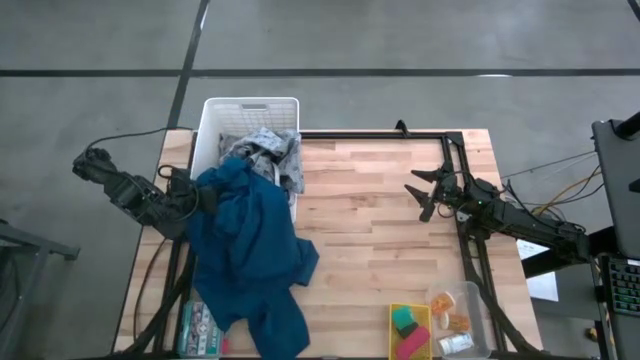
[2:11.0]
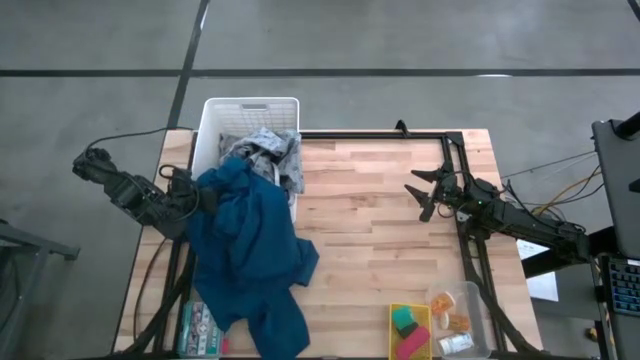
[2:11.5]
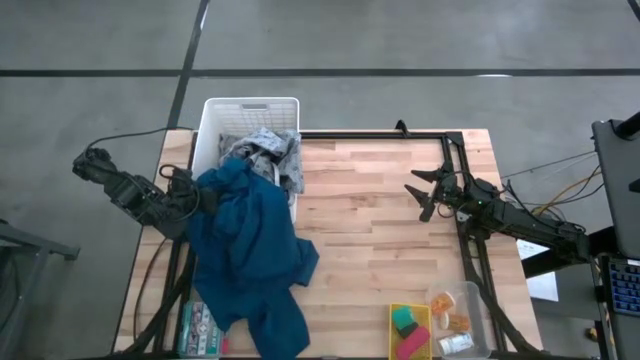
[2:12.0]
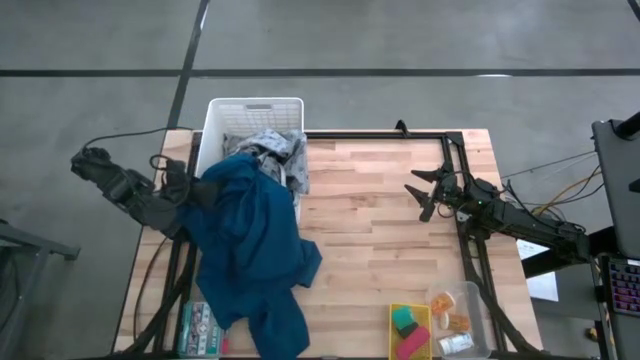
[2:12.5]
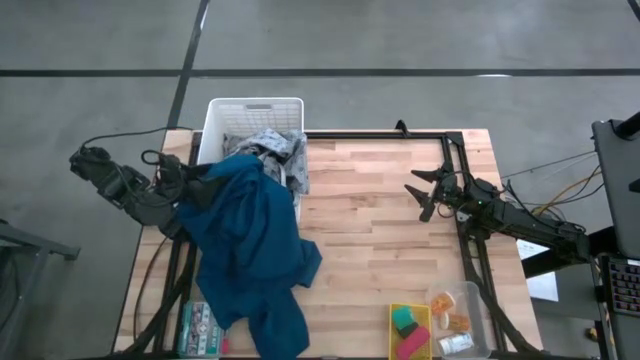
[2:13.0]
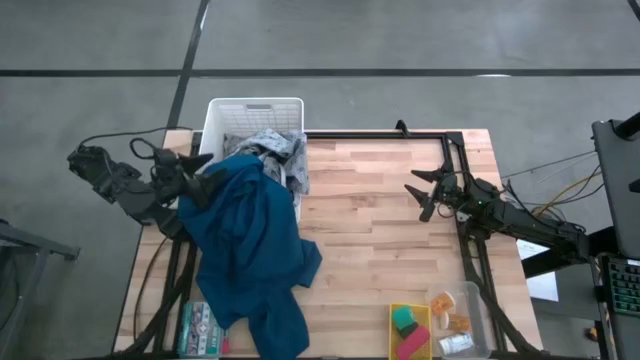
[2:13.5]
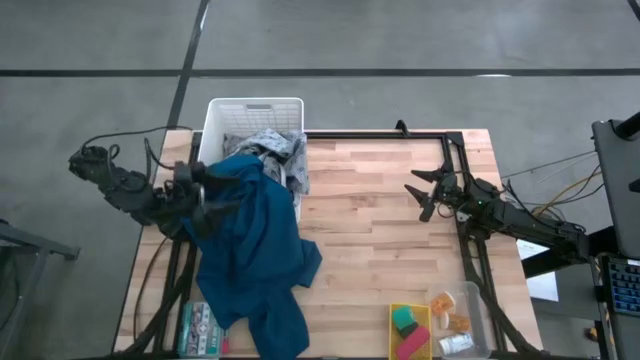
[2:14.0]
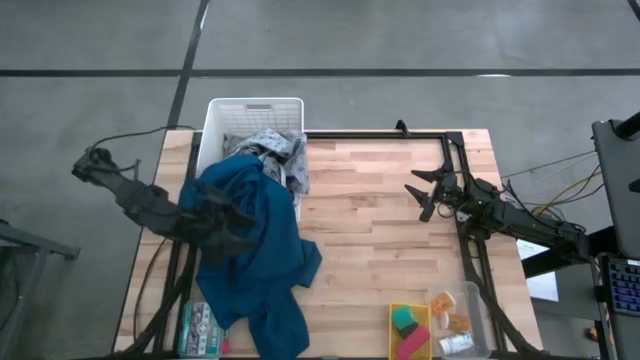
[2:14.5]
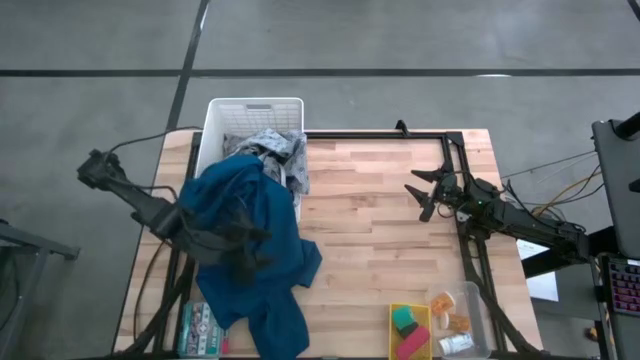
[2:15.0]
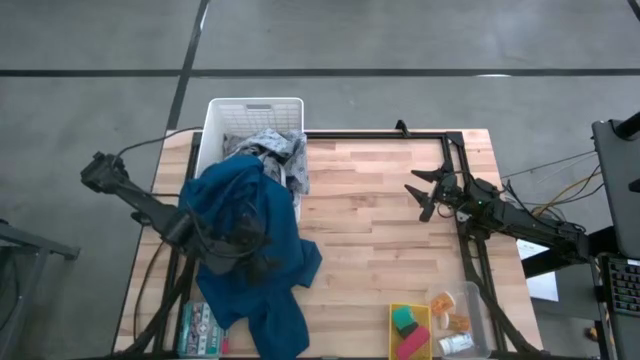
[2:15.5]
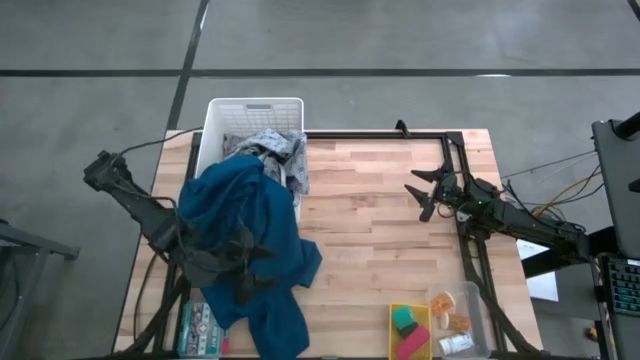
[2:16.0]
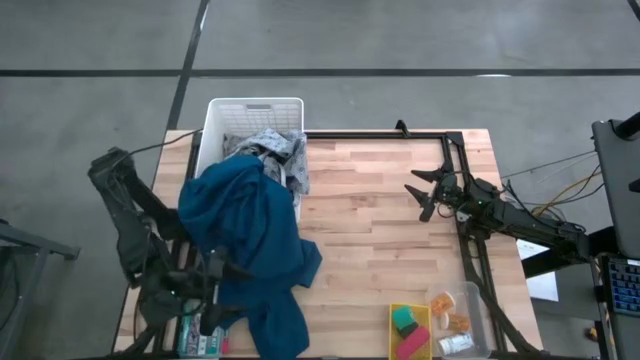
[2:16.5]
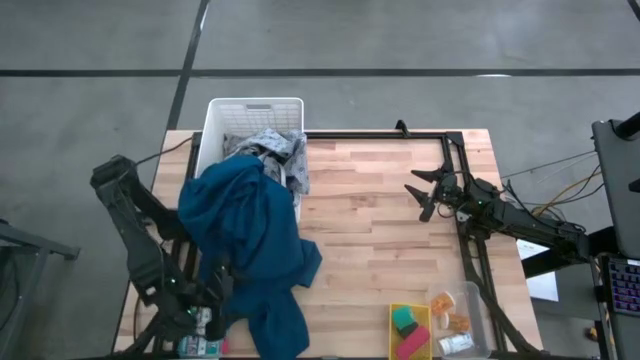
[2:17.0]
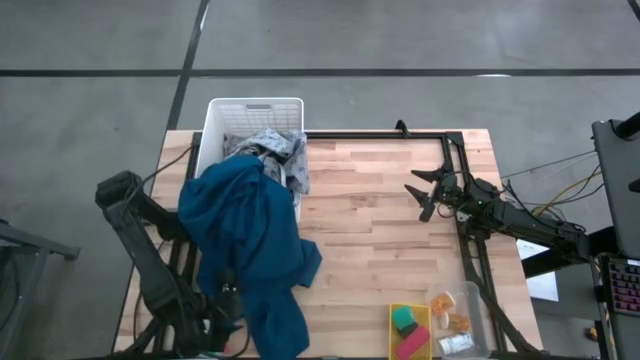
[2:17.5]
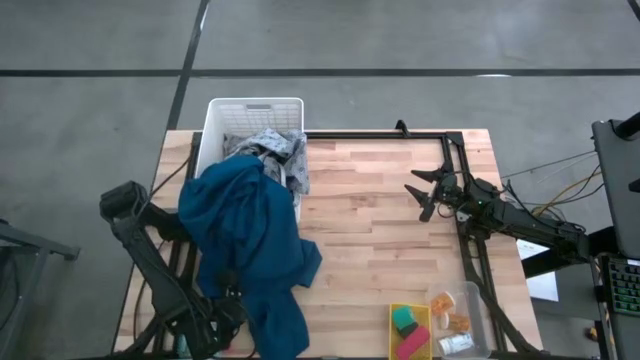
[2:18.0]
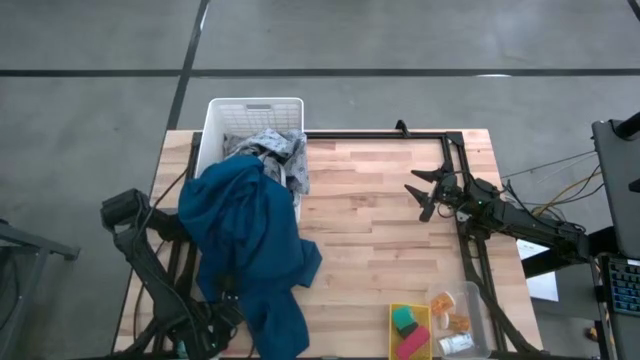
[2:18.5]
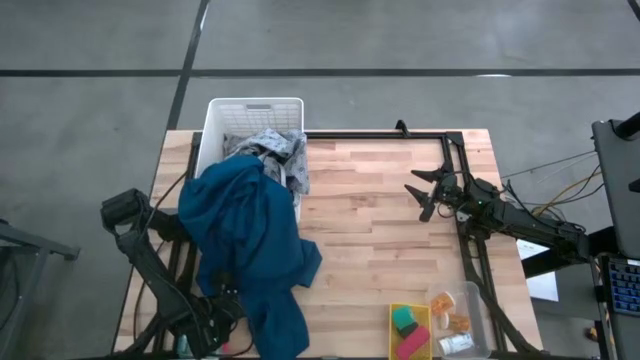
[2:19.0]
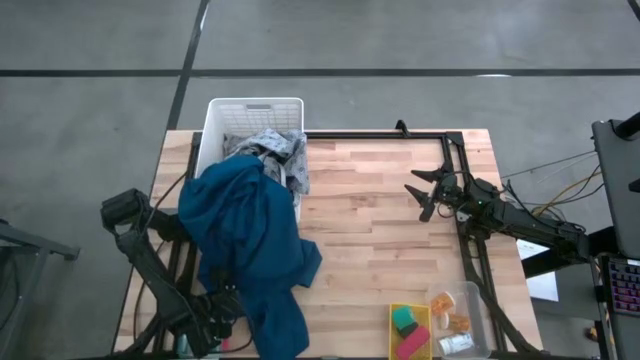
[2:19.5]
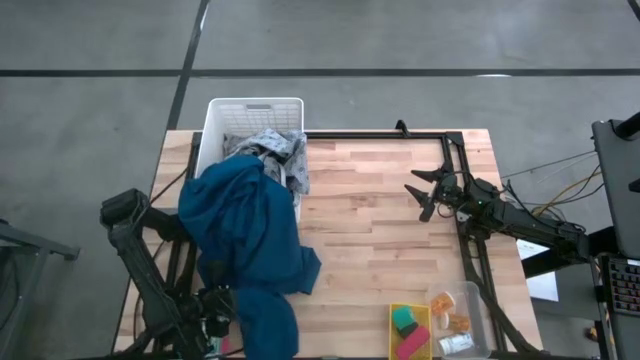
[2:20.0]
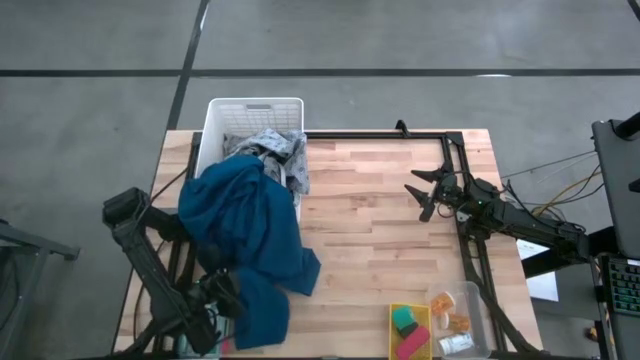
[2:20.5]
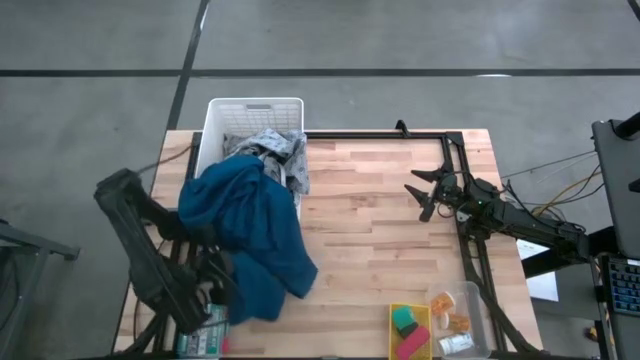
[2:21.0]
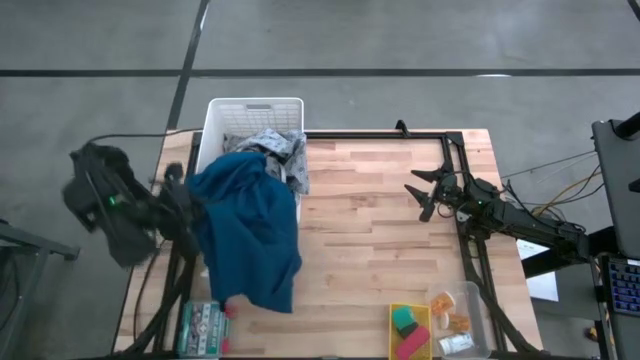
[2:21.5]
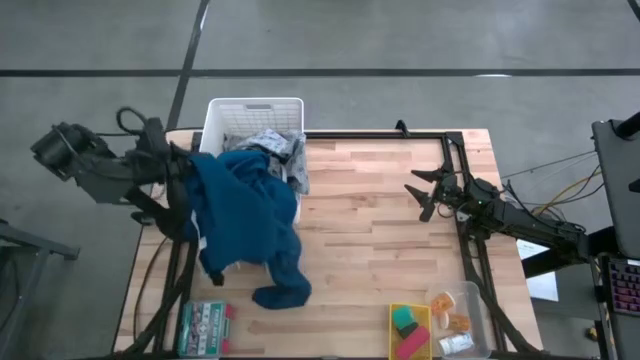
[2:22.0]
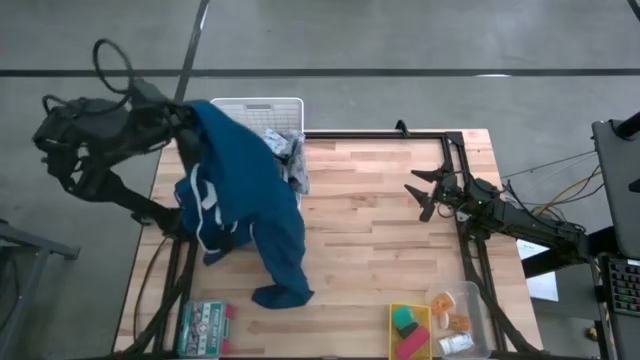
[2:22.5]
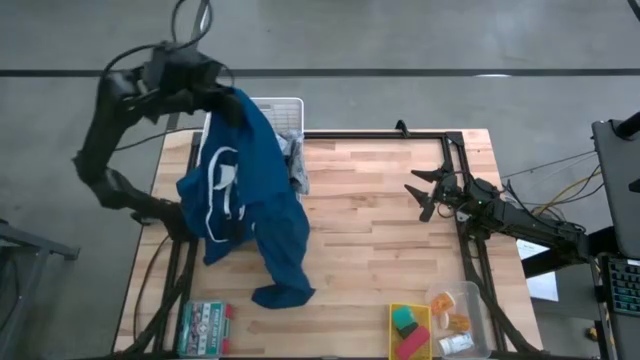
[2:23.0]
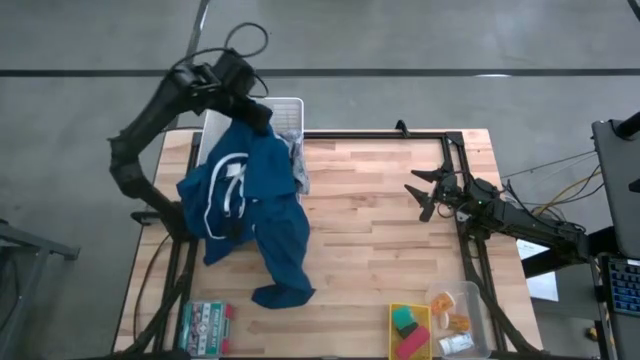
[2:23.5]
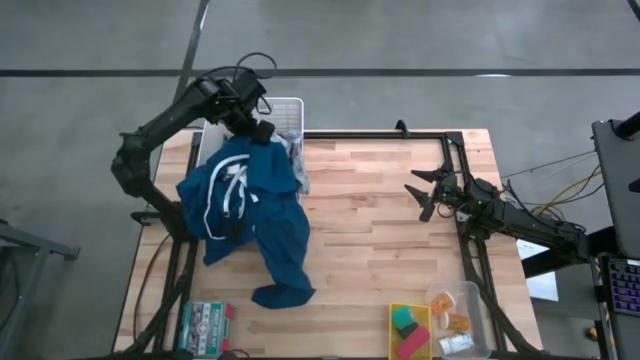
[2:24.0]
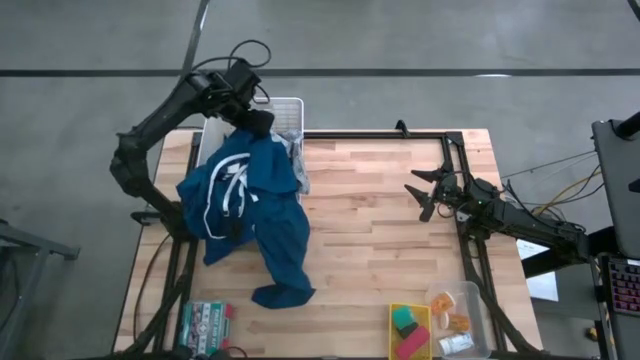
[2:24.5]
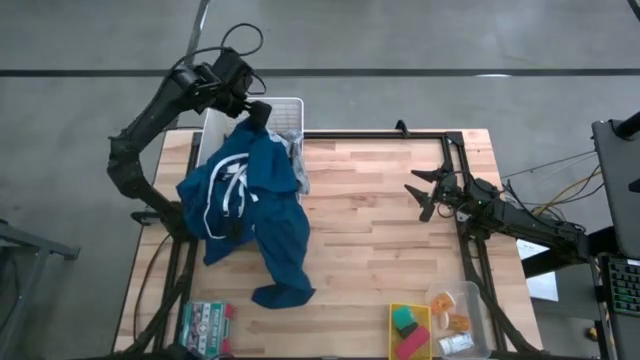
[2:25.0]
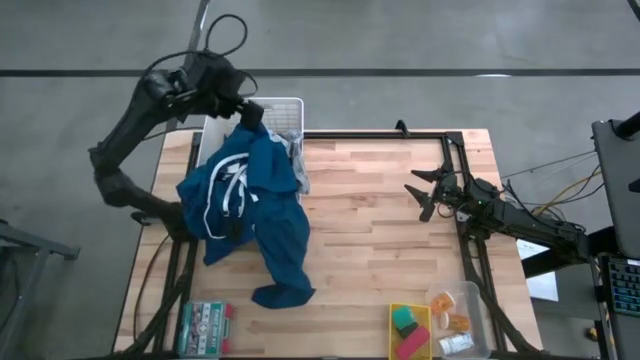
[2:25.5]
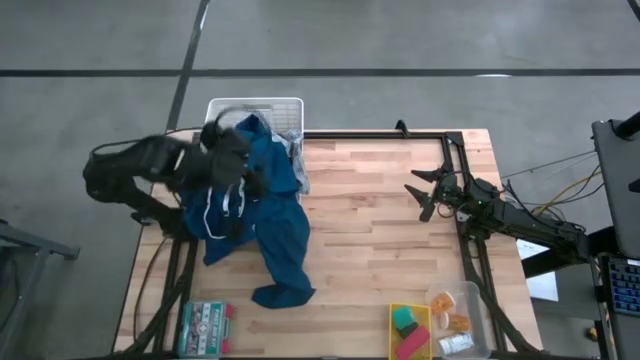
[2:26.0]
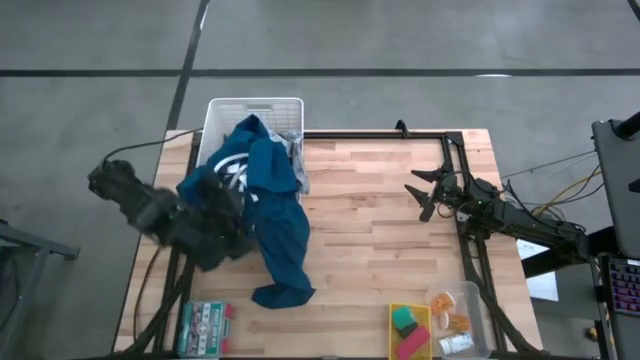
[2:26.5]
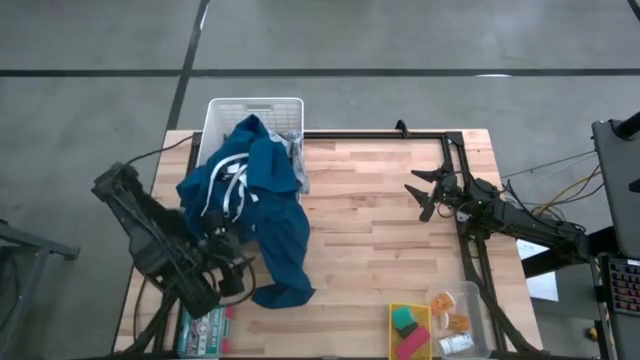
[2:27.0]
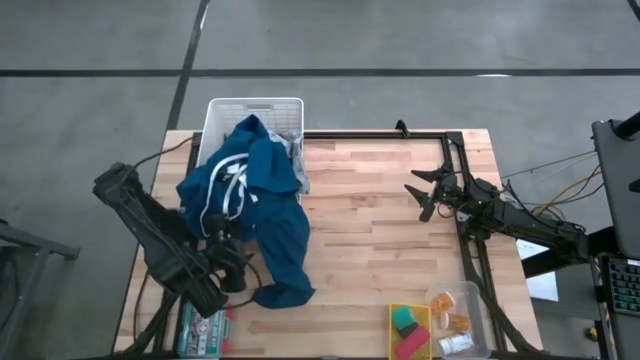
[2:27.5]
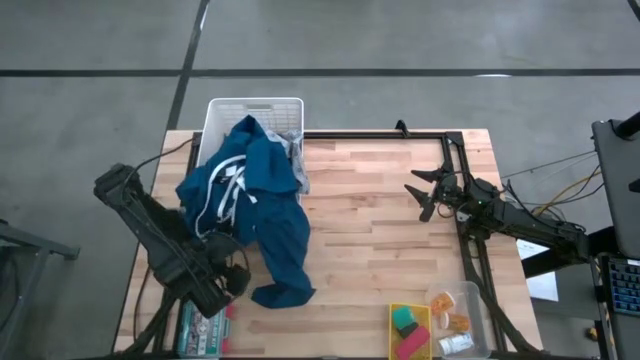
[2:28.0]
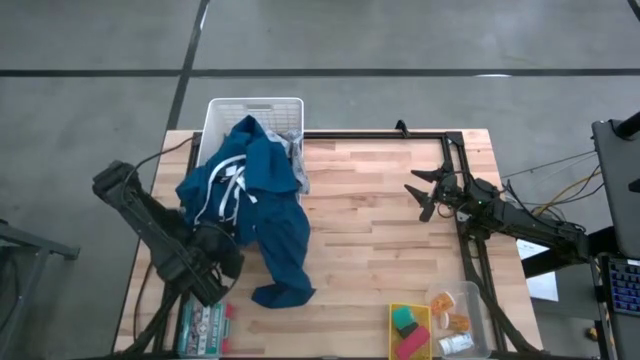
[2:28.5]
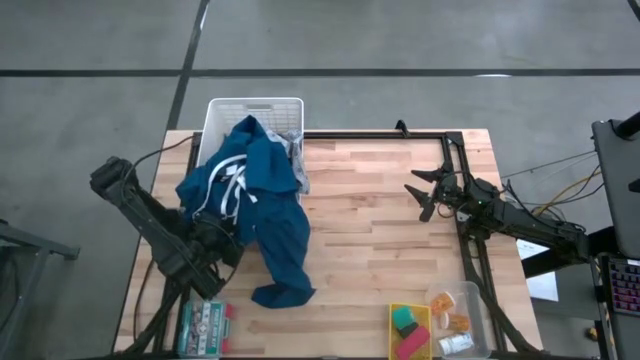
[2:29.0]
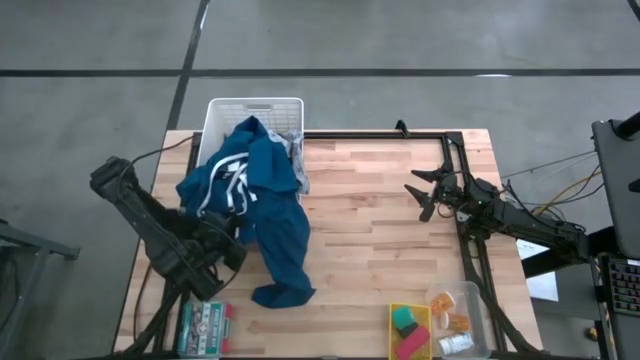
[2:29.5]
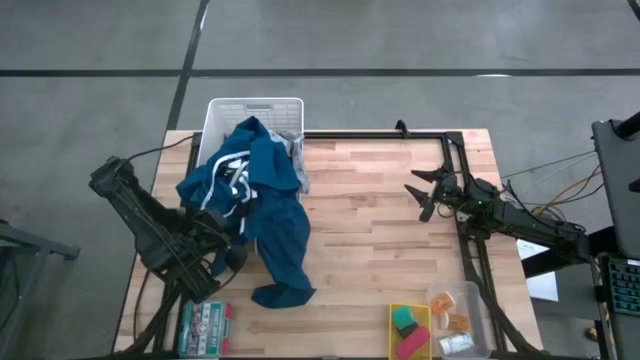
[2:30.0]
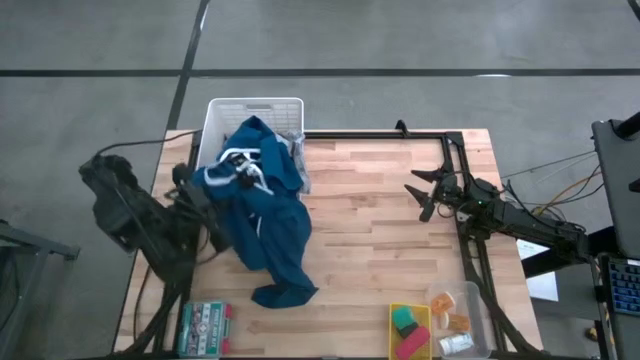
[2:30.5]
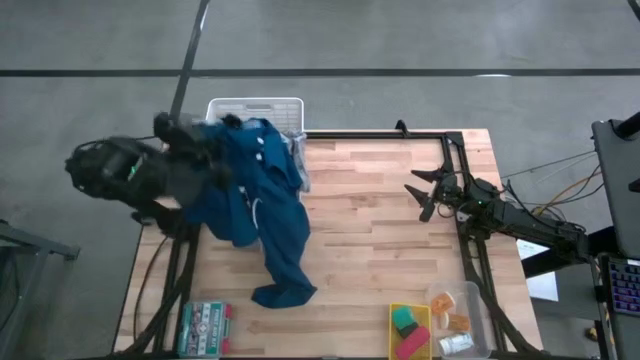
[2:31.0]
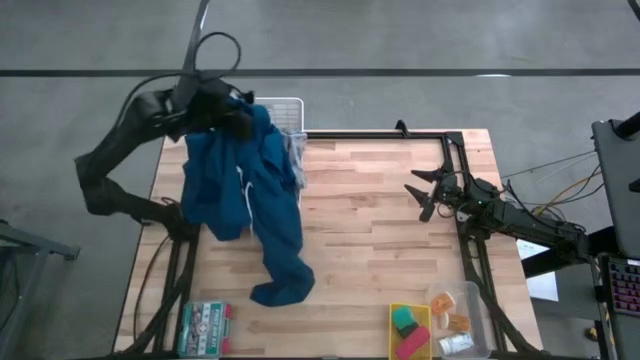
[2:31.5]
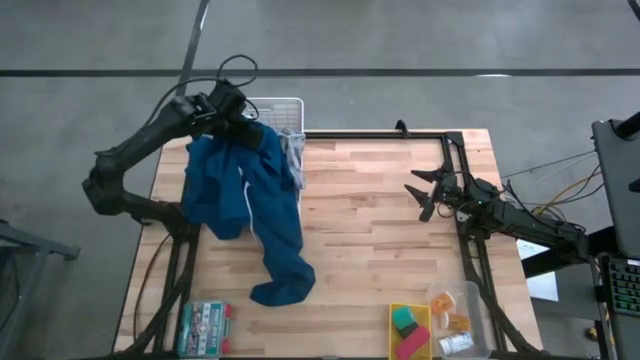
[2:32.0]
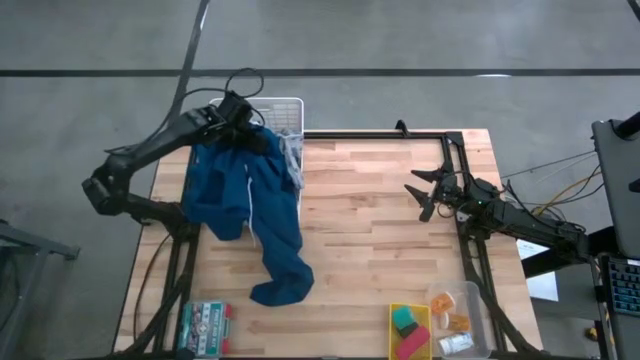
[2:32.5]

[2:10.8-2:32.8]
Task: Pick & Place Medicine items
Put the blue patient gown into the white laundry bin
